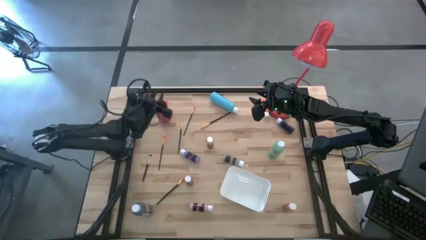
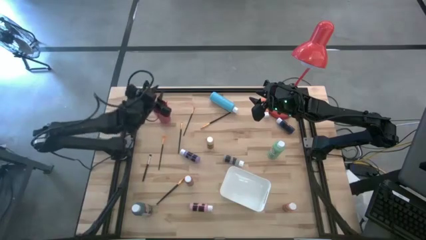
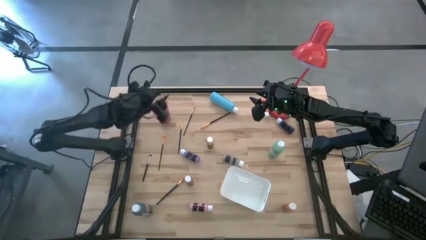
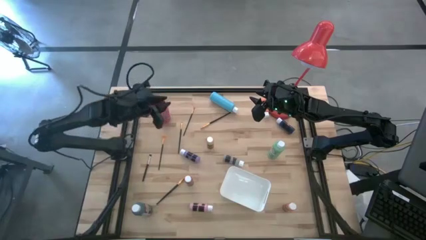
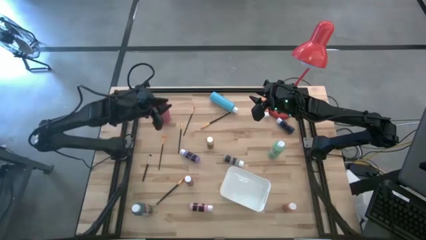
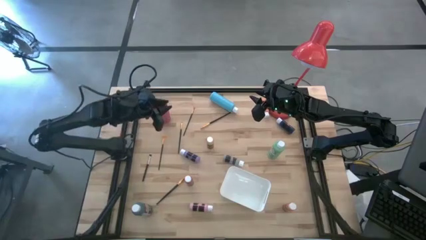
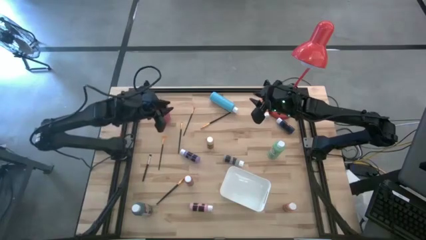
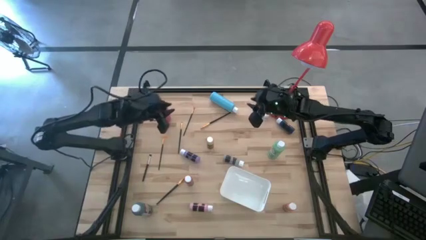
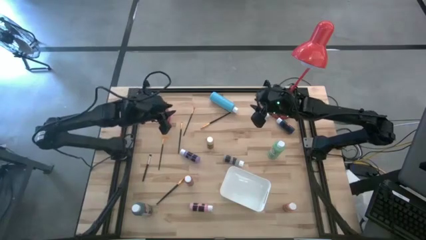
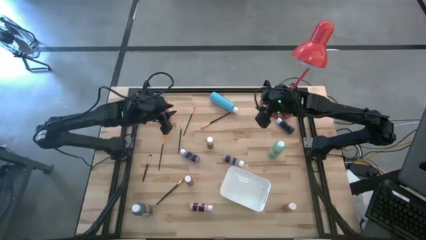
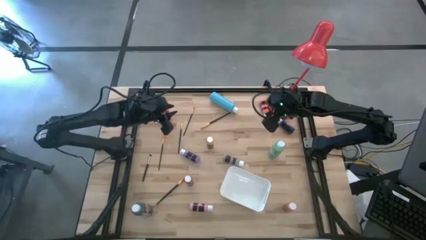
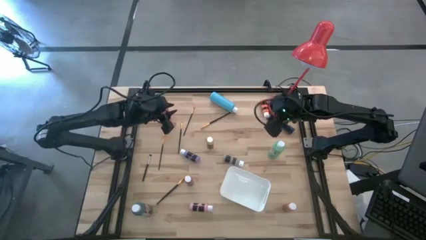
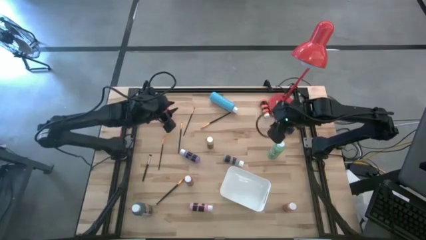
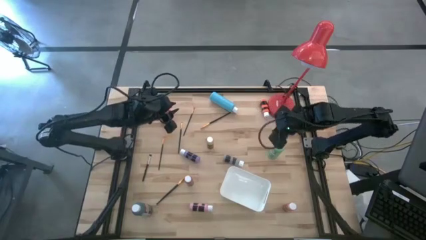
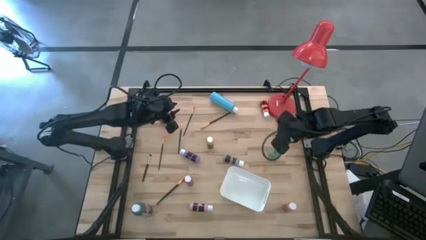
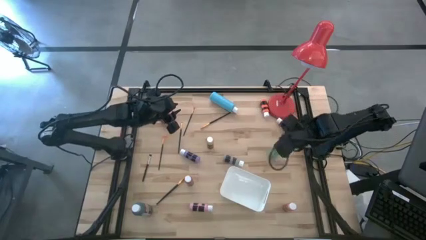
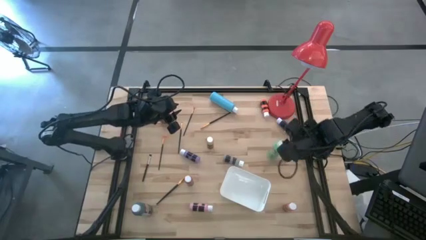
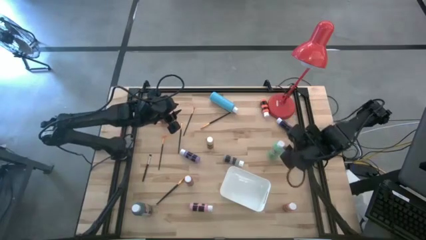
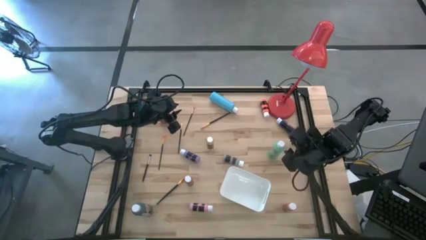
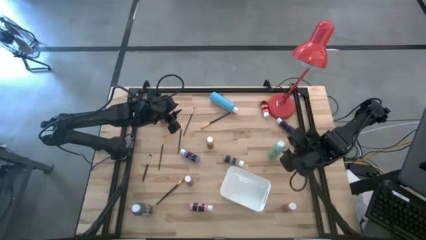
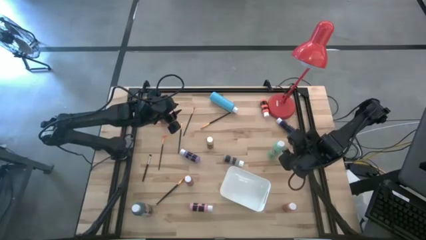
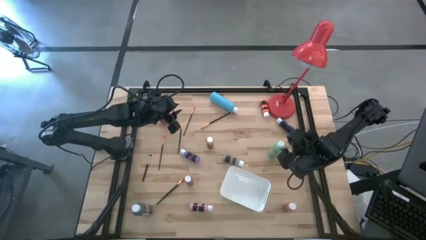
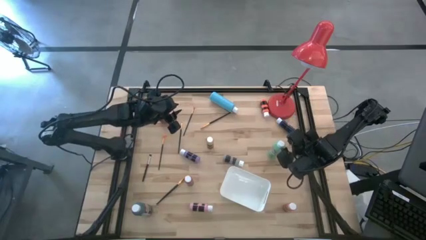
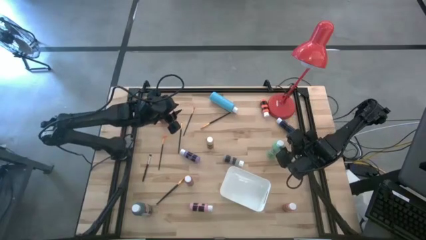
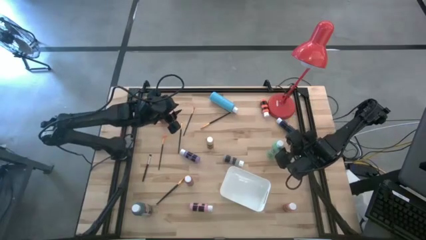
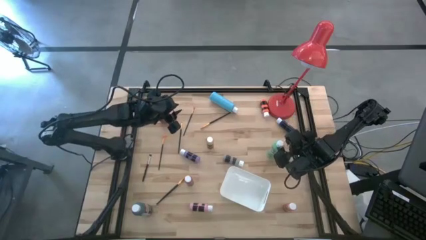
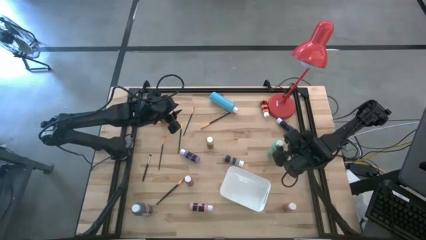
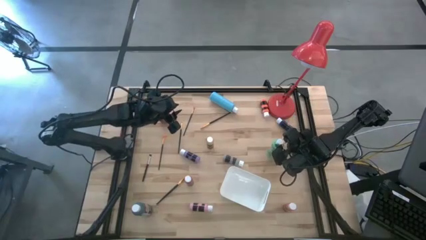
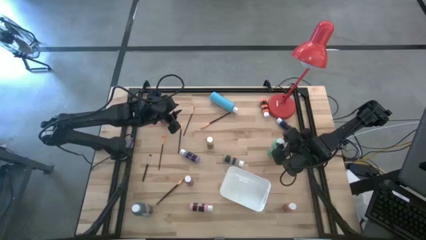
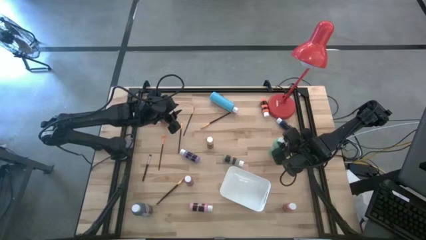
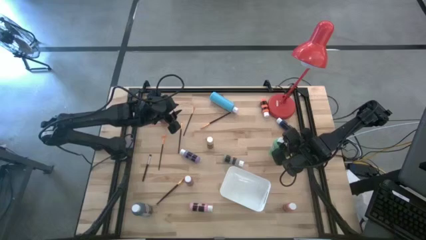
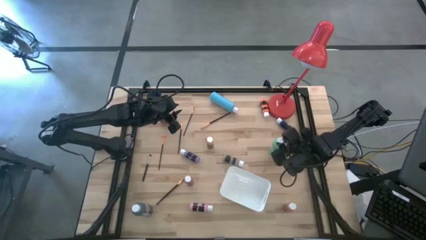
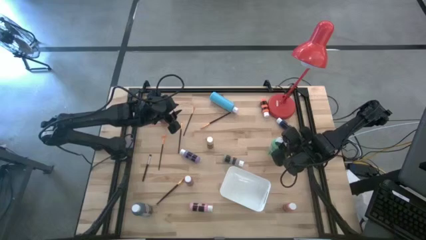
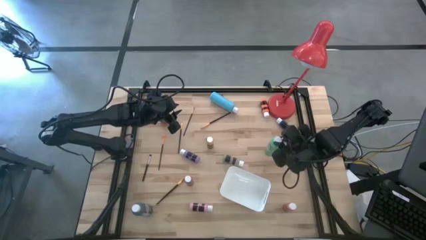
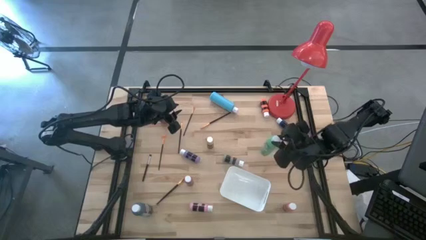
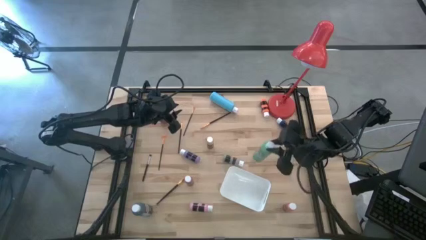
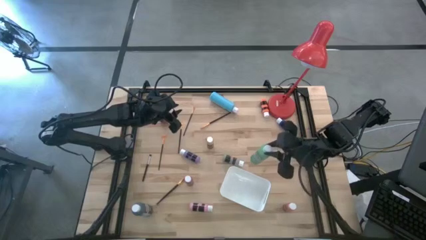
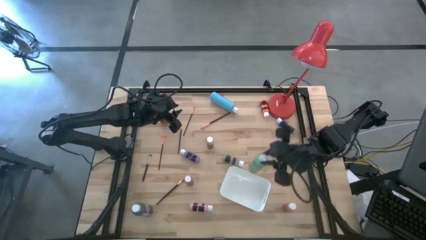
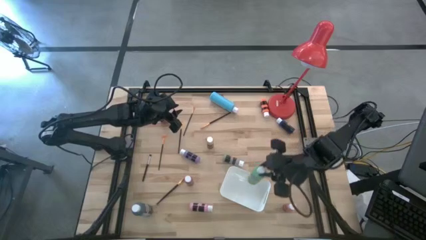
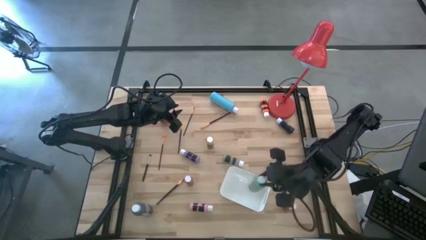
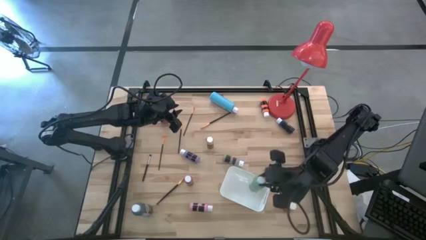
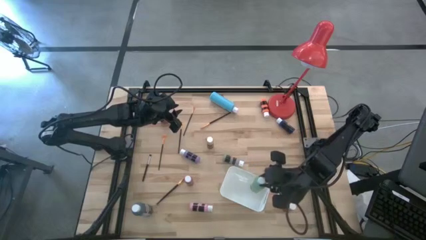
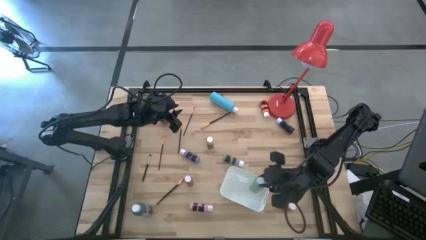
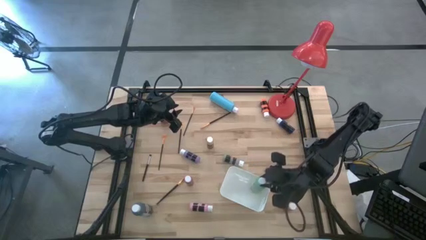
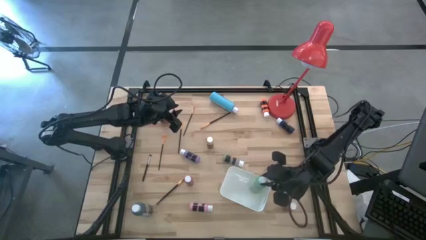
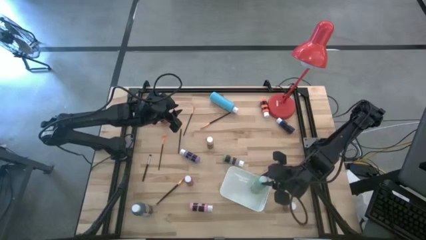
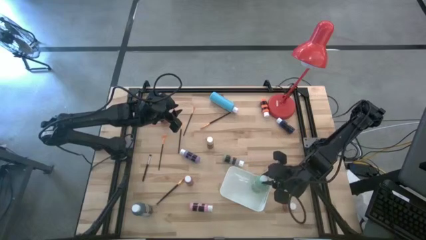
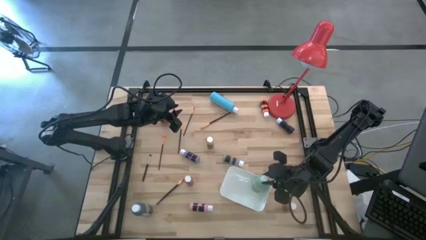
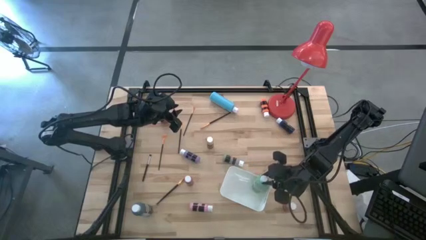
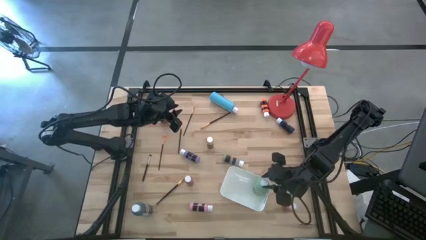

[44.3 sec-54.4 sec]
Task: Pick & Place Paint Supplies
Put the green paint bottle into the white bin
